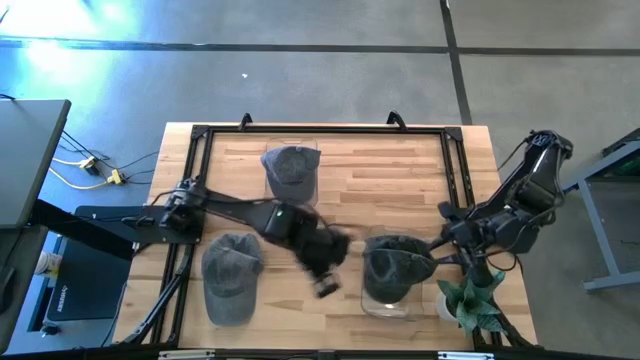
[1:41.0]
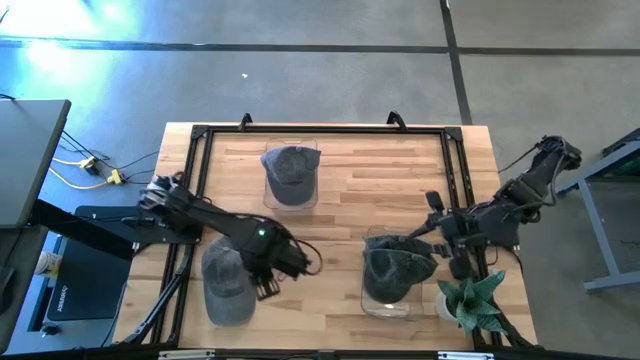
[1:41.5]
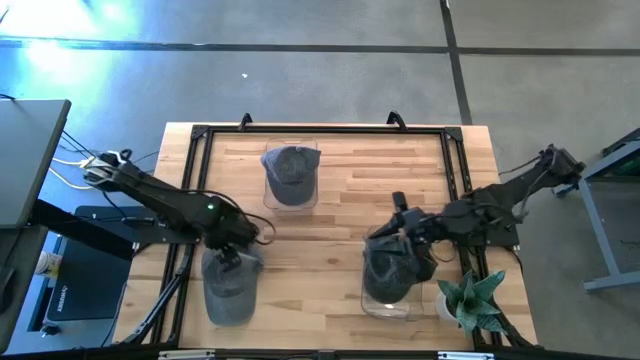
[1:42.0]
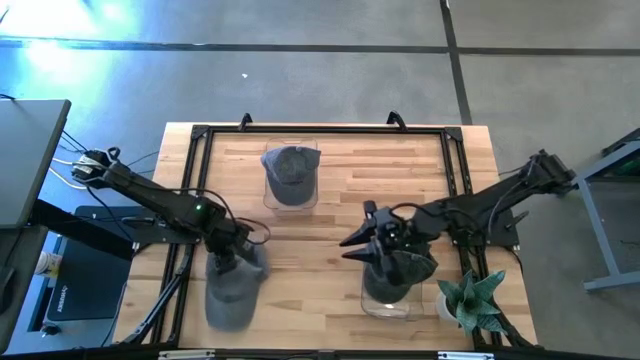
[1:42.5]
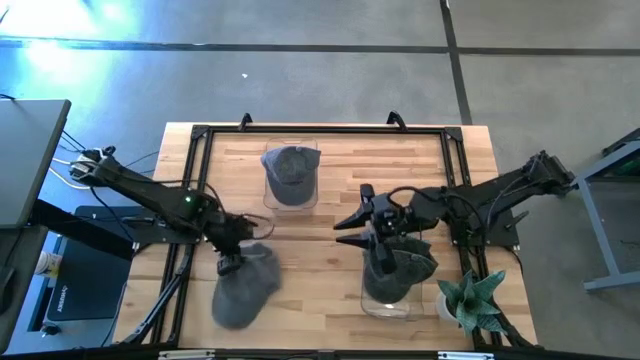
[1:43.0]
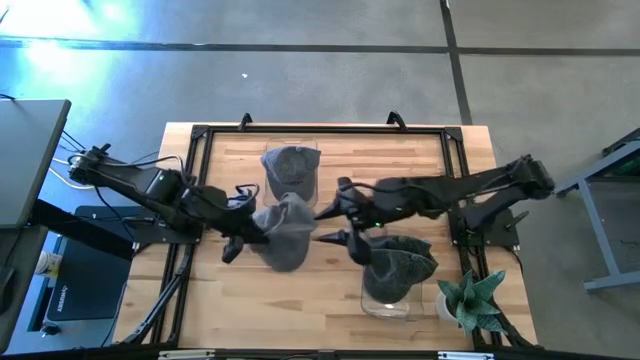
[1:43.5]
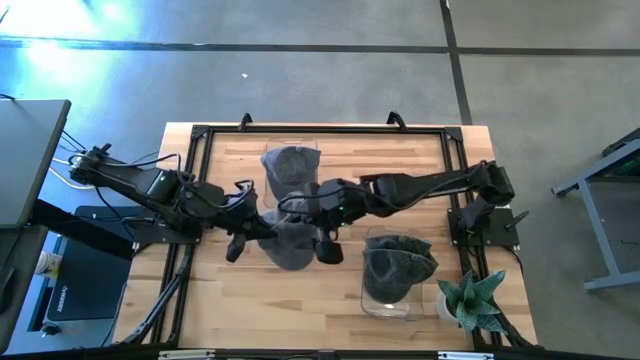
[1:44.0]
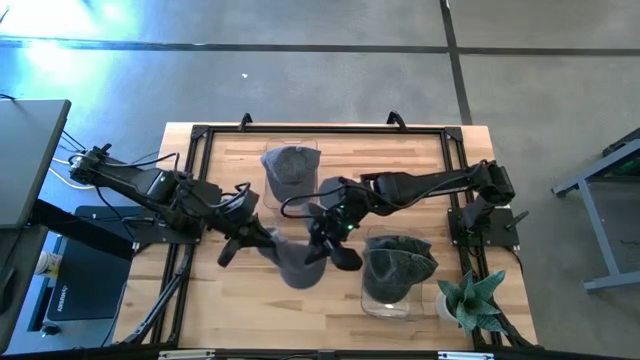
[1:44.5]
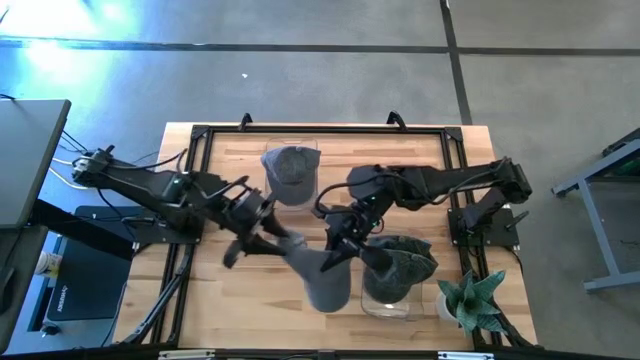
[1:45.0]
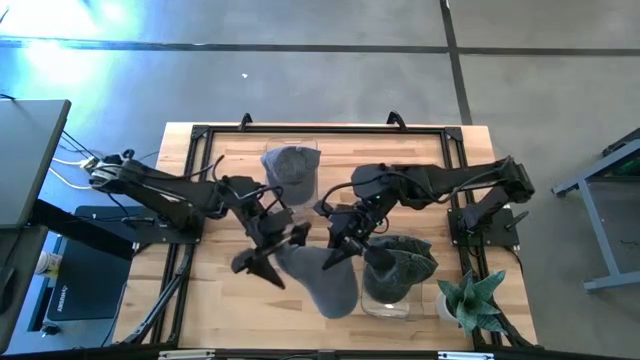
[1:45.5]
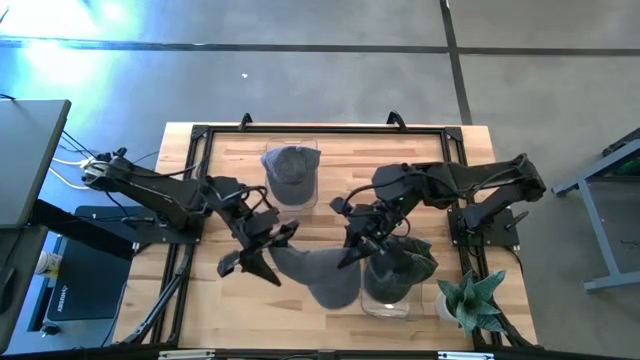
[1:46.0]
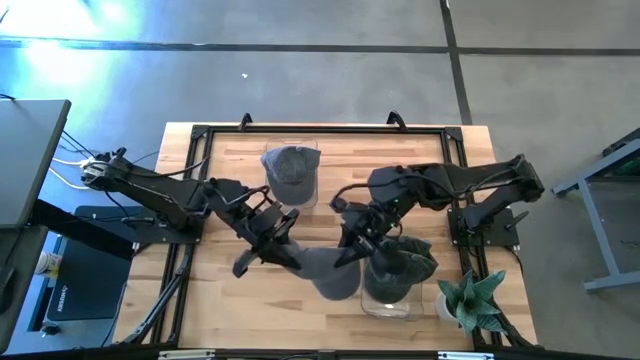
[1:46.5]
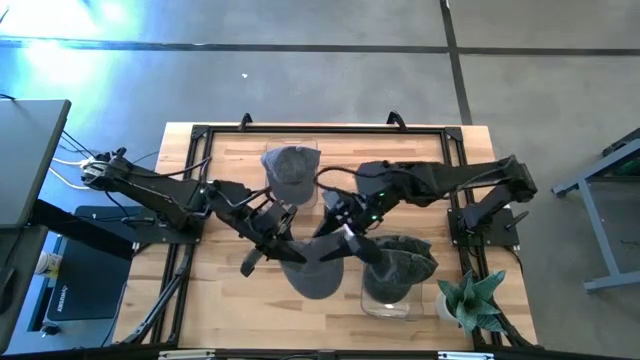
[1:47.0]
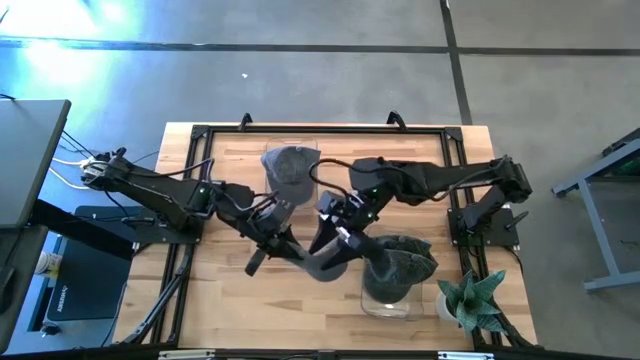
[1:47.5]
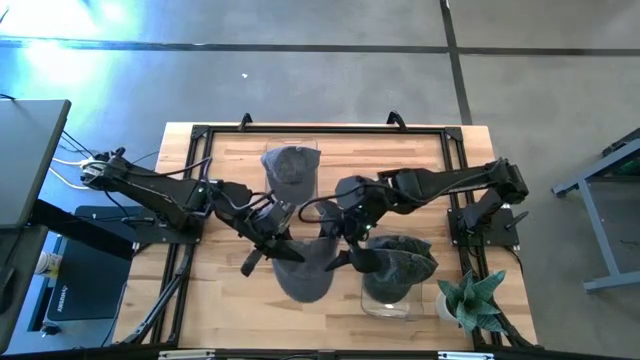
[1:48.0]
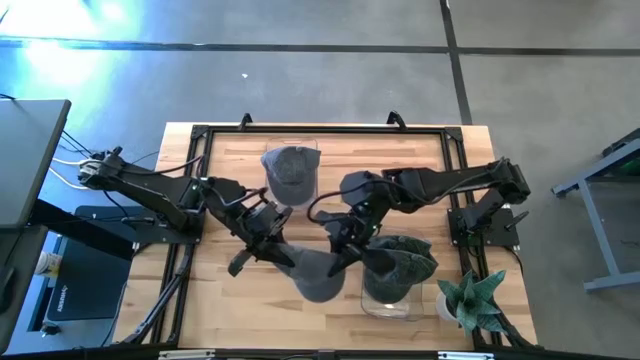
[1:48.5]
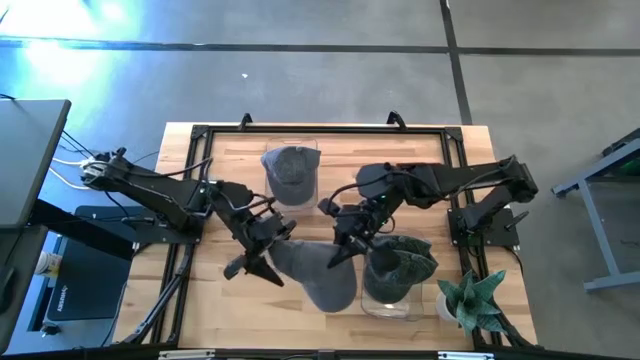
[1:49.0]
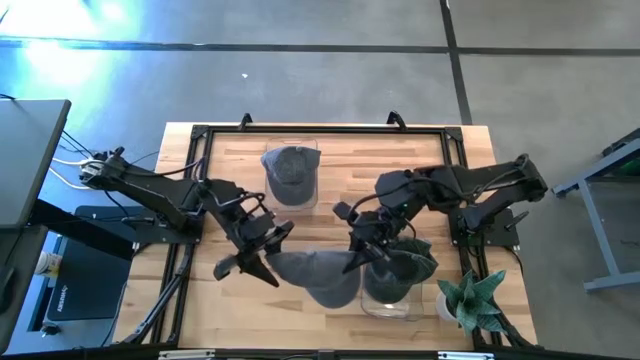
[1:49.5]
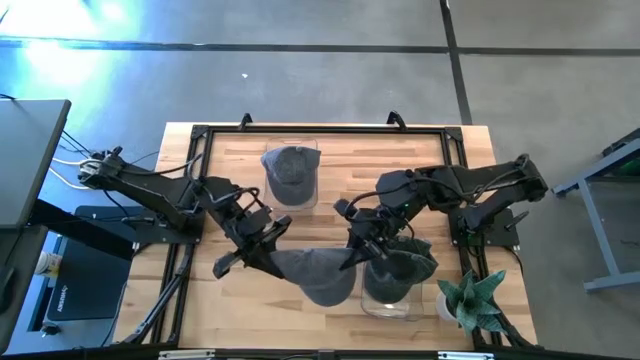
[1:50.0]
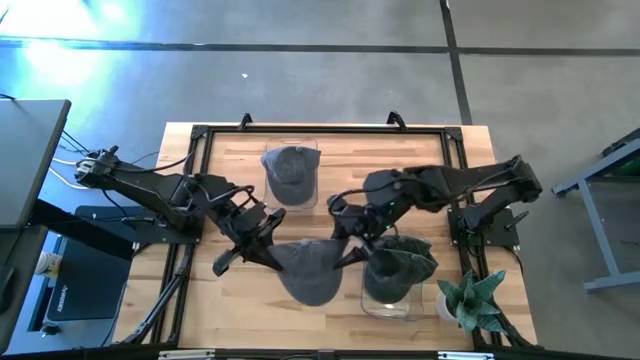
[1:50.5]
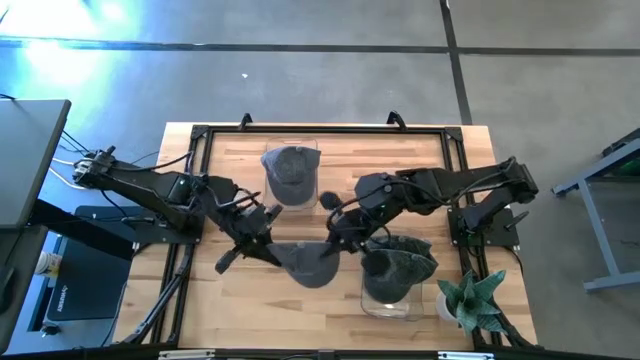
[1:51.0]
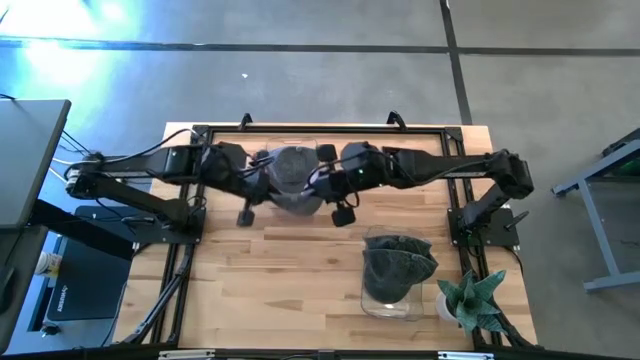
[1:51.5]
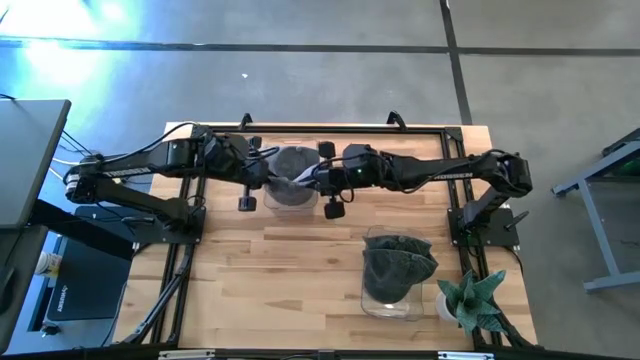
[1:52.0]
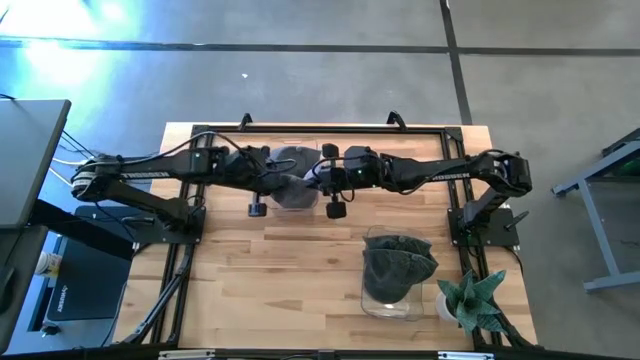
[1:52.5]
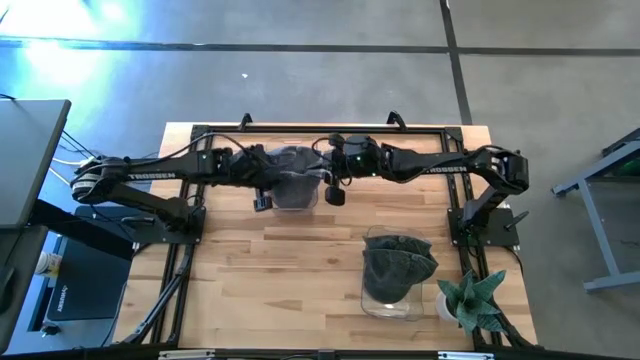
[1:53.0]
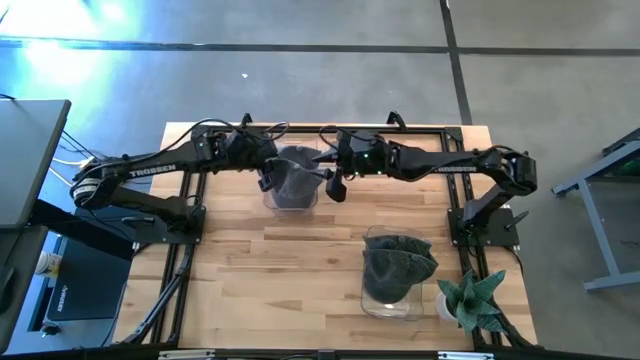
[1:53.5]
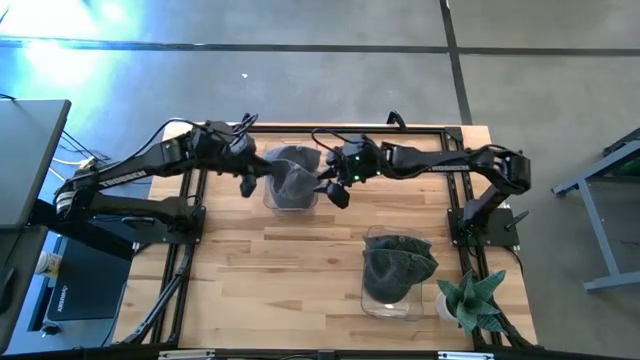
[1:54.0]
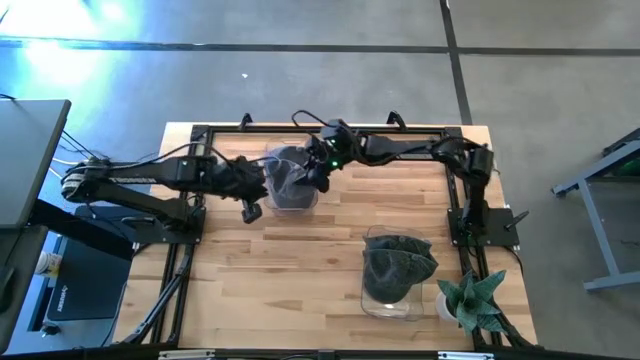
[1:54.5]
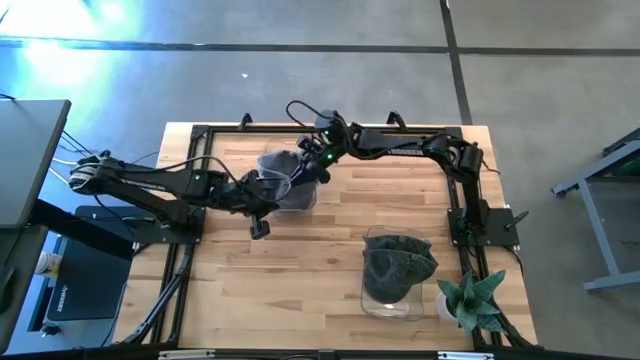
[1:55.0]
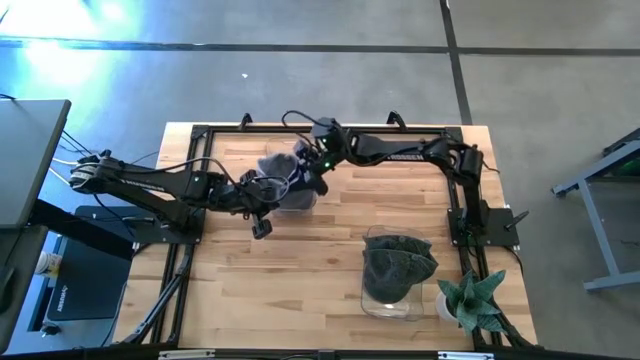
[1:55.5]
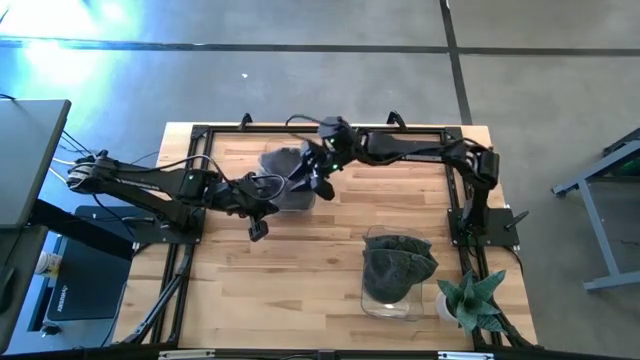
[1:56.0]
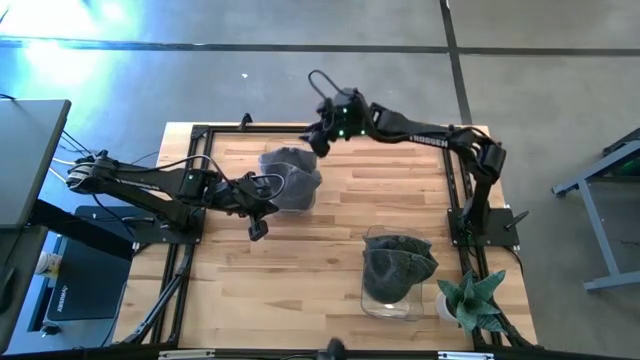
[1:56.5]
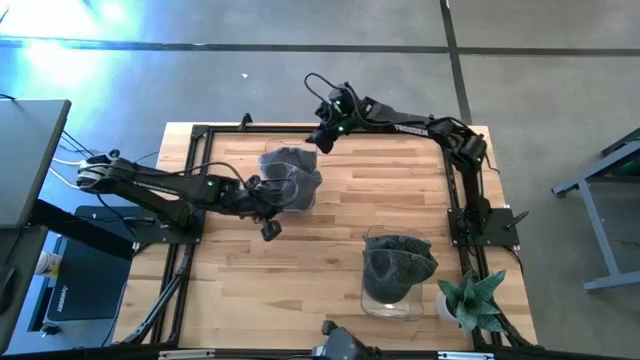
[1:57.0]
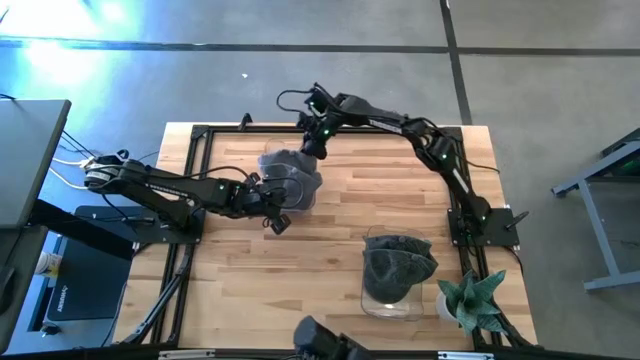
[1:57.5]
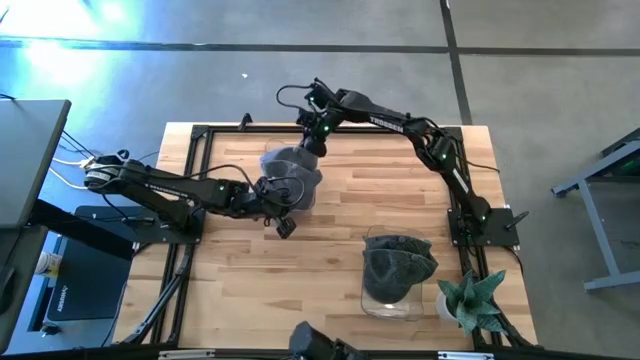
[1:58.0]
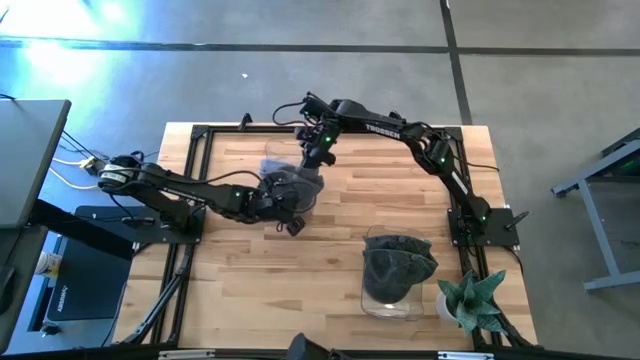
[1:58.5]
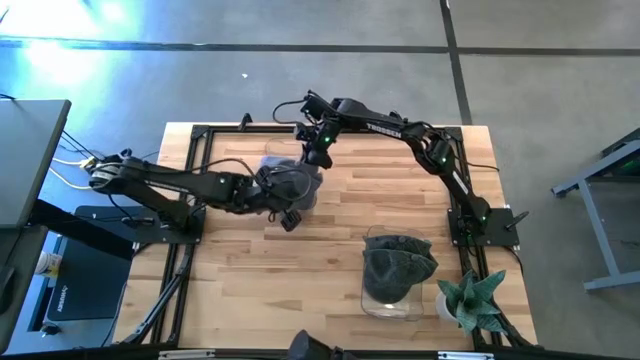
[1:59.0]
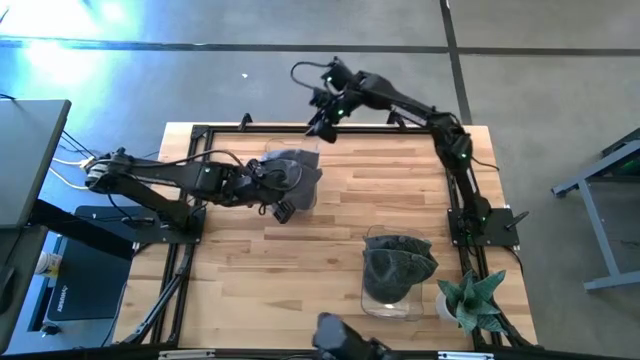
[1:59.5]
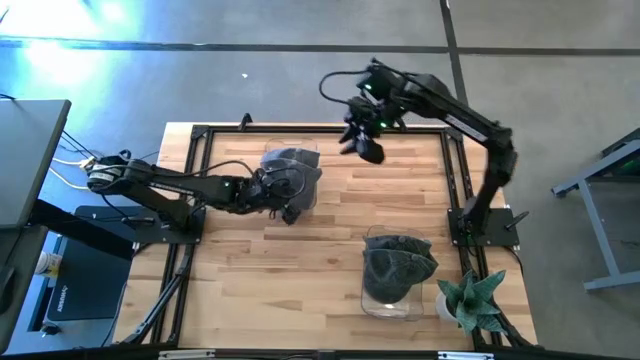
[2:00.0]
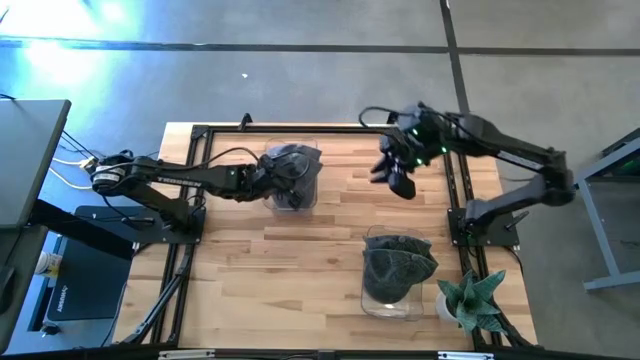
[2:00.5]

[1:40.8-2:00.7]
Task: Pick & Place hat
Put the light gray cap into the top transparent bin

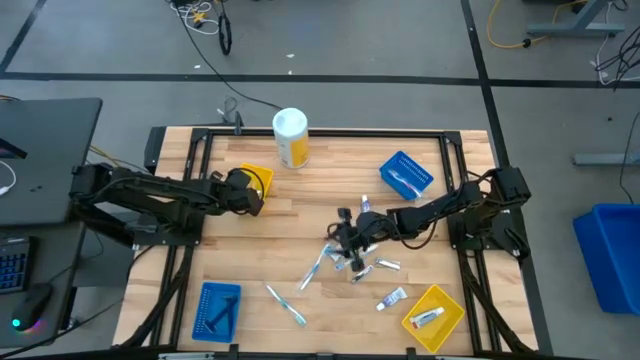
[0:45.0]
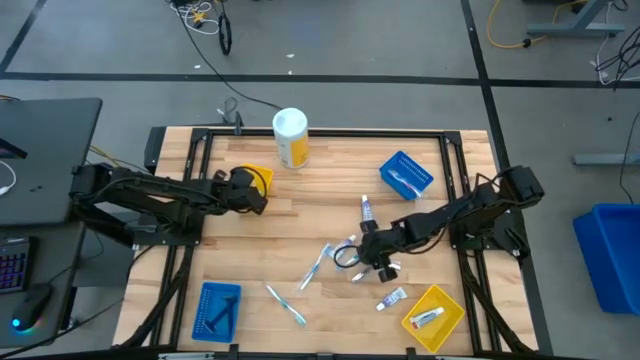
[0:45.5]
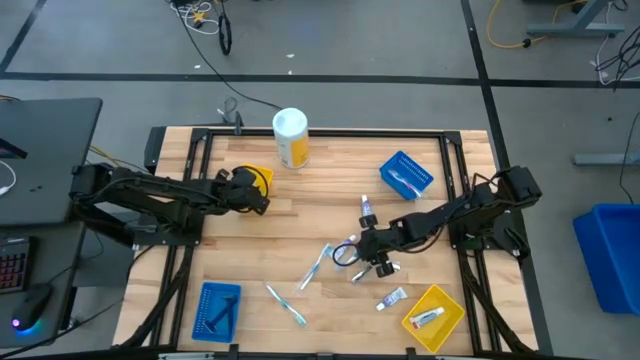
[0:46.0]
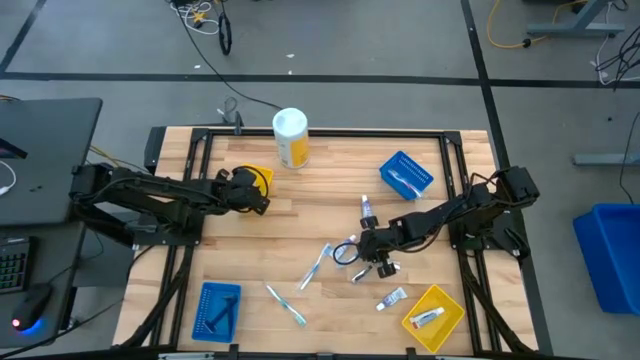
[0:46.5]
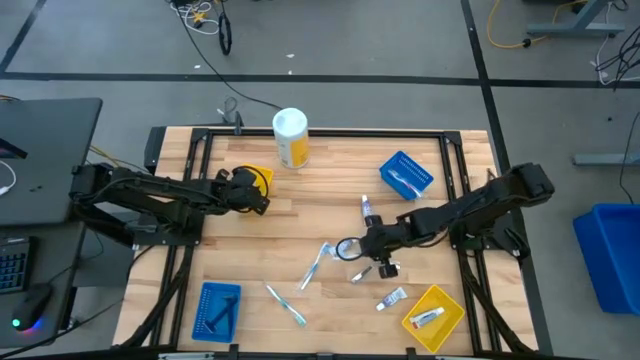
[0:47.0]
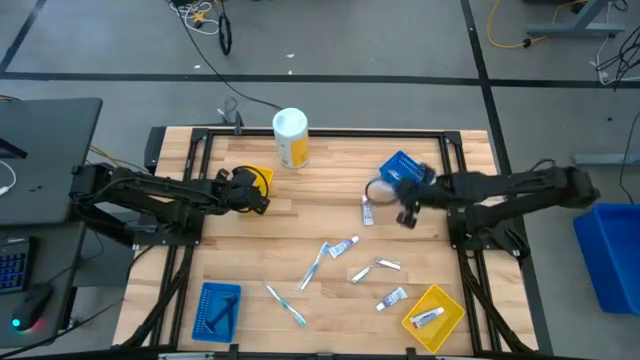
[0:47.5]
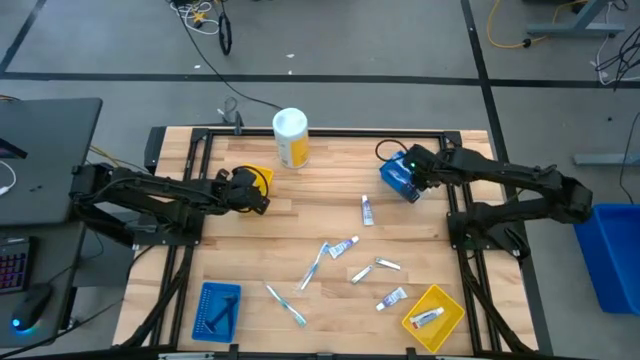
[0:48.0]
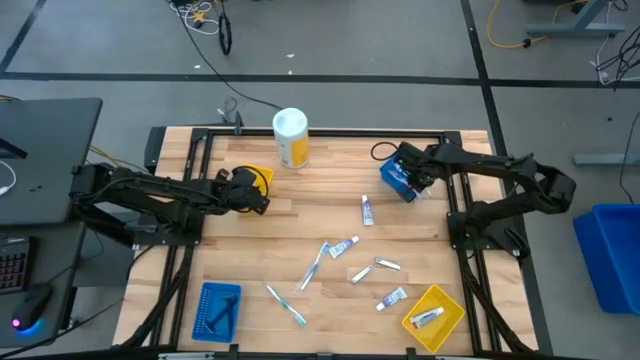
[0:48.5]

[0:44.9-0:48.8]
Task: Pick & Place Travel size toiletries
Put the blue toothbrush into the top blue bin
